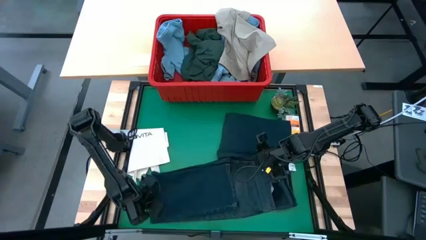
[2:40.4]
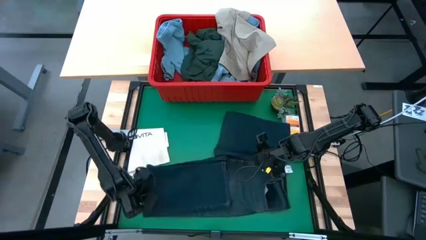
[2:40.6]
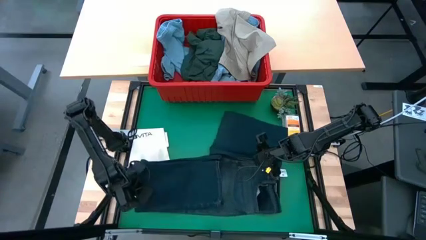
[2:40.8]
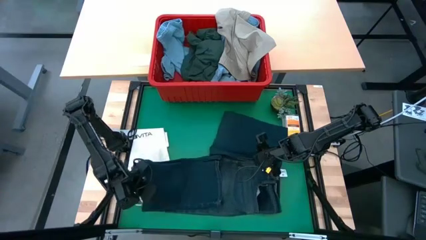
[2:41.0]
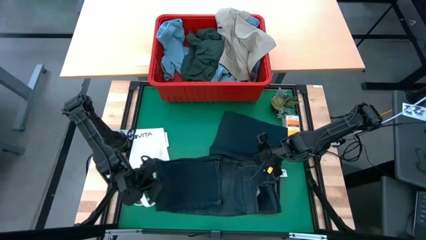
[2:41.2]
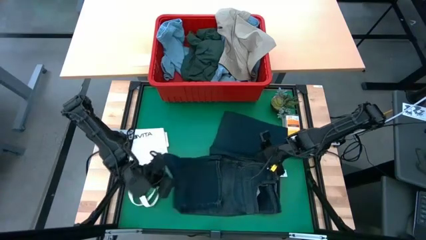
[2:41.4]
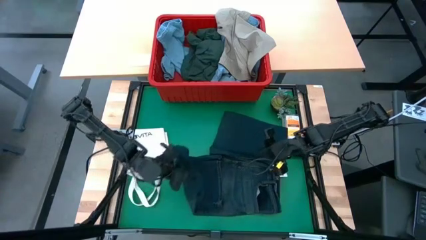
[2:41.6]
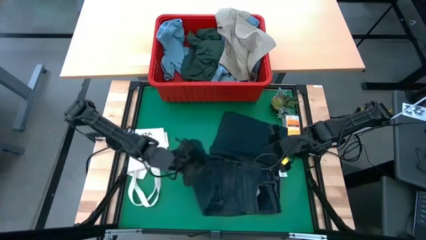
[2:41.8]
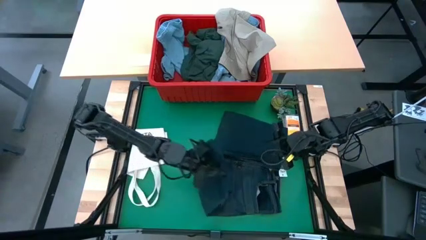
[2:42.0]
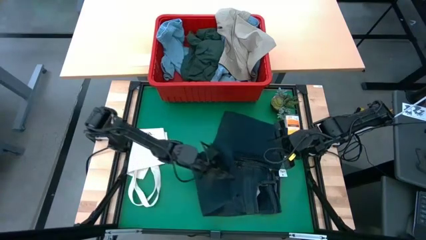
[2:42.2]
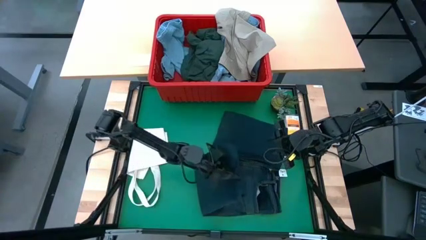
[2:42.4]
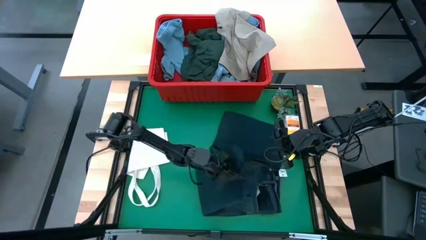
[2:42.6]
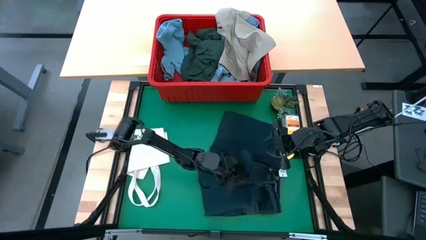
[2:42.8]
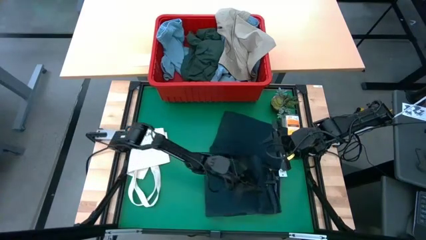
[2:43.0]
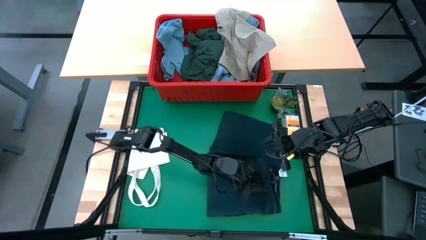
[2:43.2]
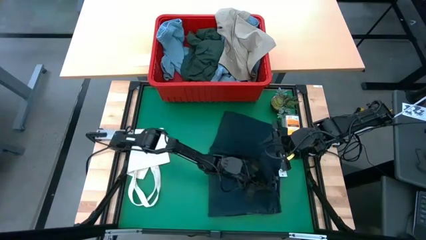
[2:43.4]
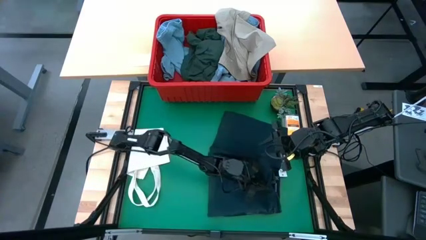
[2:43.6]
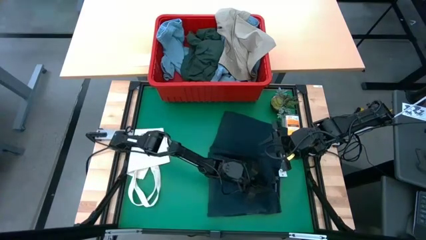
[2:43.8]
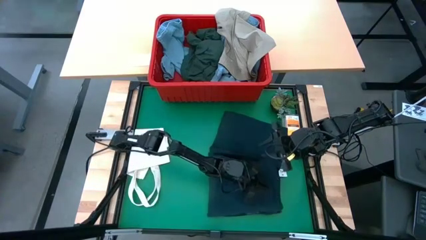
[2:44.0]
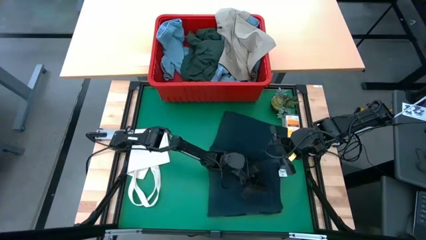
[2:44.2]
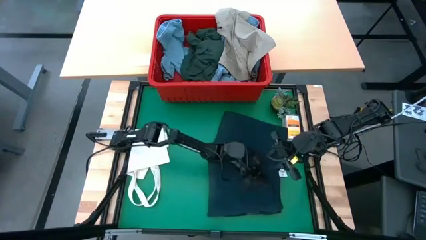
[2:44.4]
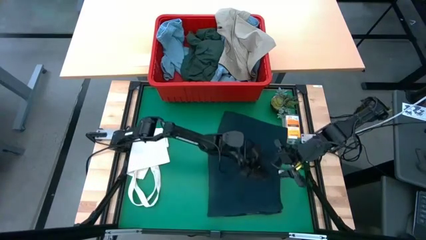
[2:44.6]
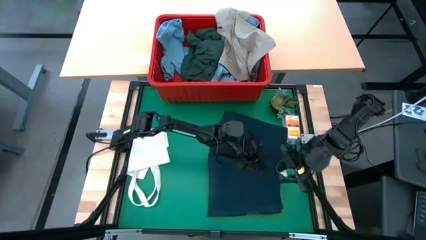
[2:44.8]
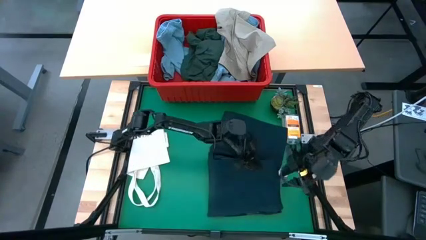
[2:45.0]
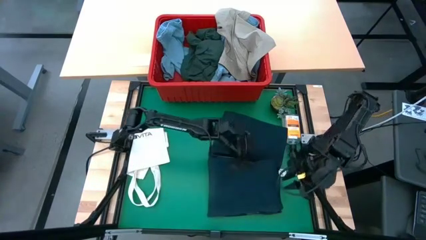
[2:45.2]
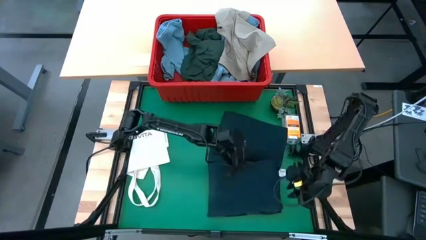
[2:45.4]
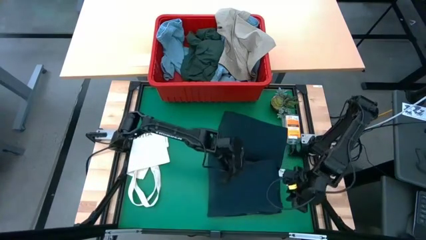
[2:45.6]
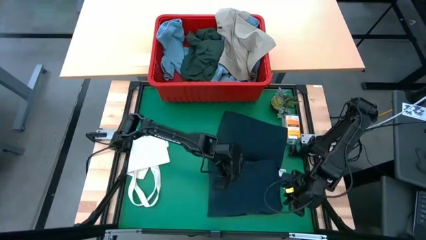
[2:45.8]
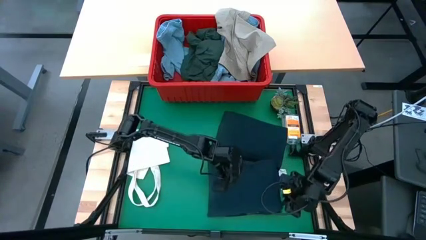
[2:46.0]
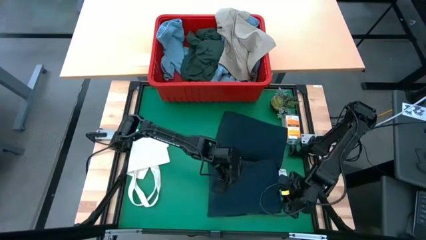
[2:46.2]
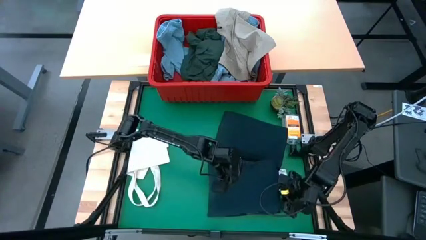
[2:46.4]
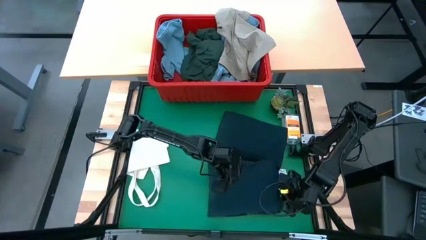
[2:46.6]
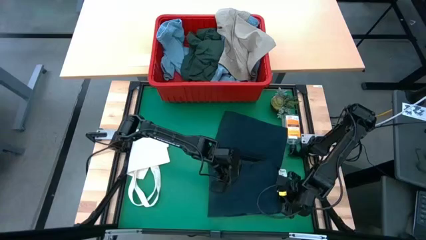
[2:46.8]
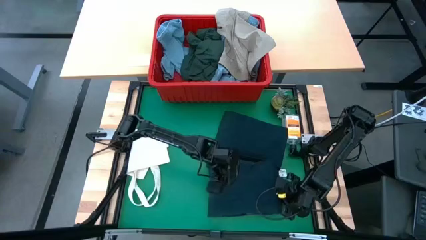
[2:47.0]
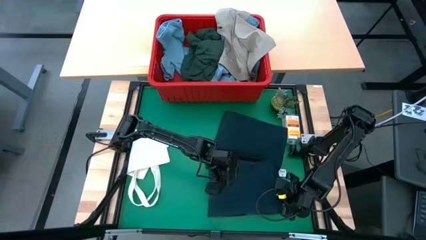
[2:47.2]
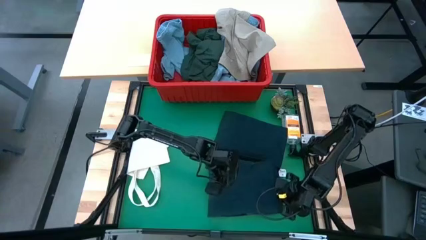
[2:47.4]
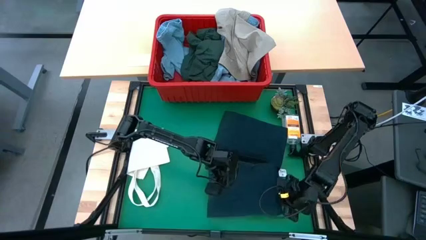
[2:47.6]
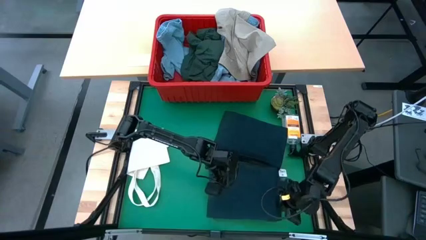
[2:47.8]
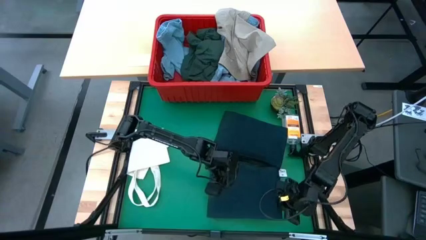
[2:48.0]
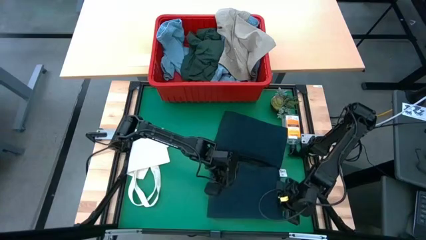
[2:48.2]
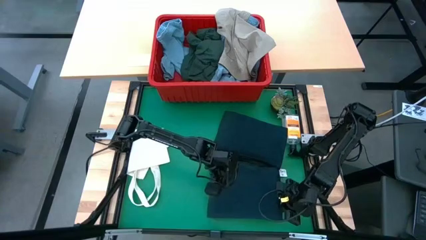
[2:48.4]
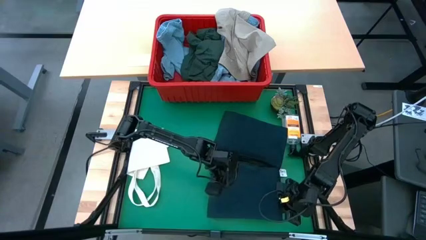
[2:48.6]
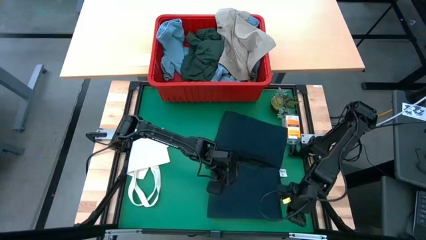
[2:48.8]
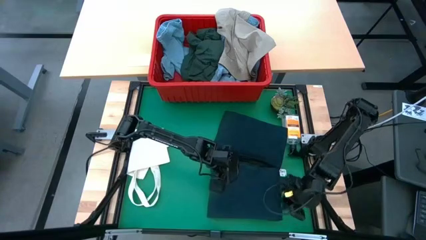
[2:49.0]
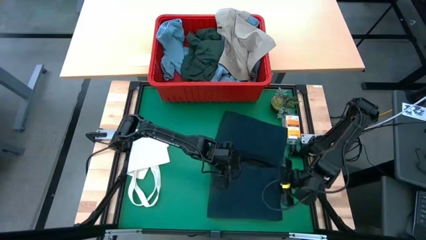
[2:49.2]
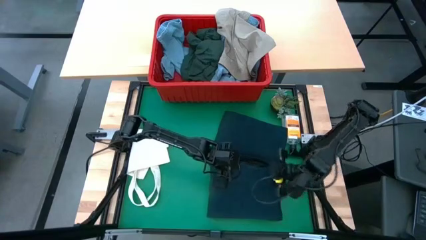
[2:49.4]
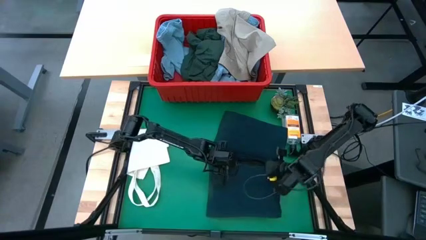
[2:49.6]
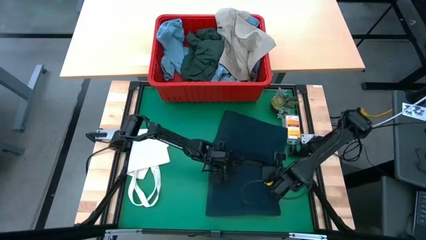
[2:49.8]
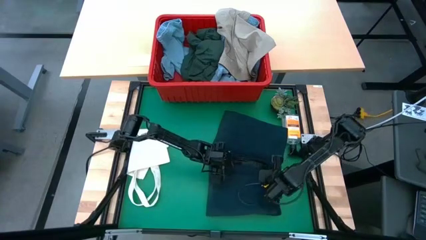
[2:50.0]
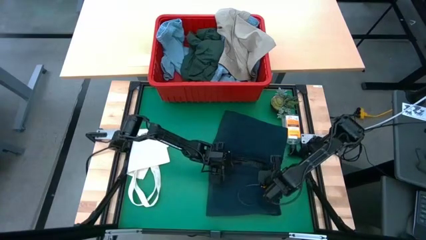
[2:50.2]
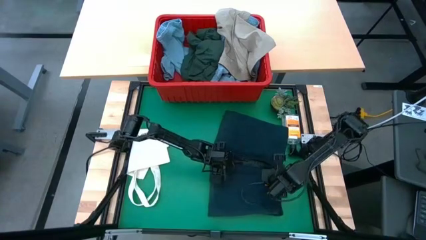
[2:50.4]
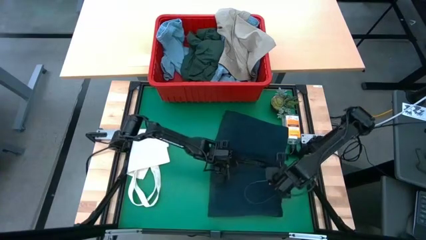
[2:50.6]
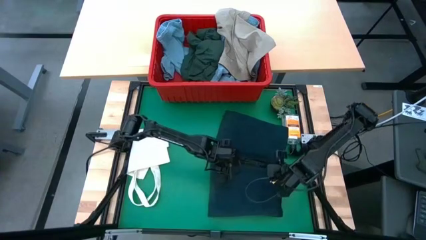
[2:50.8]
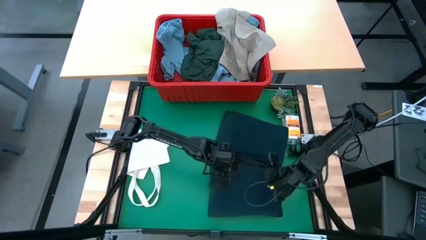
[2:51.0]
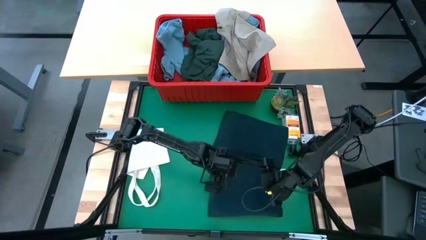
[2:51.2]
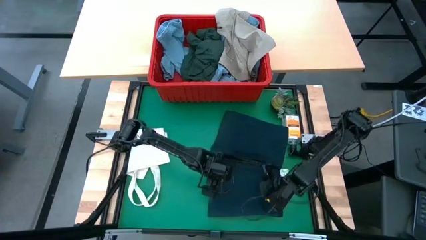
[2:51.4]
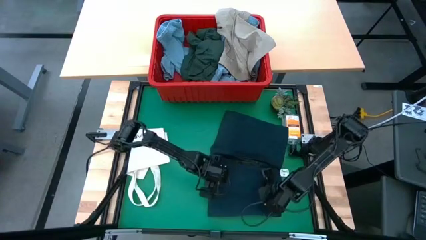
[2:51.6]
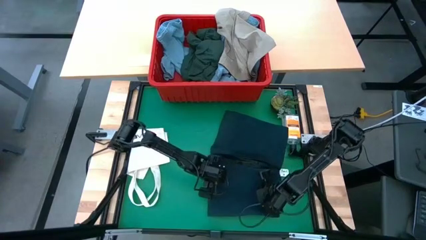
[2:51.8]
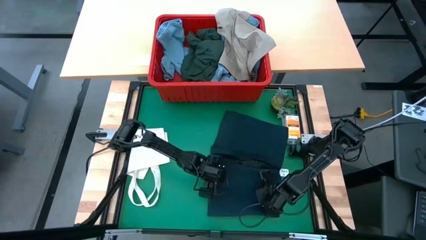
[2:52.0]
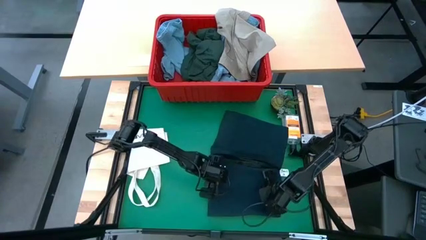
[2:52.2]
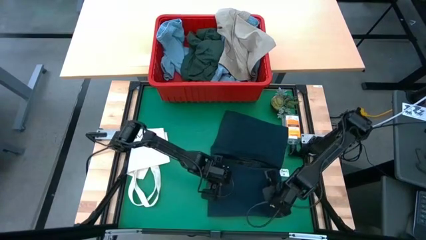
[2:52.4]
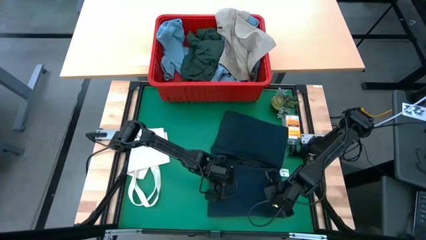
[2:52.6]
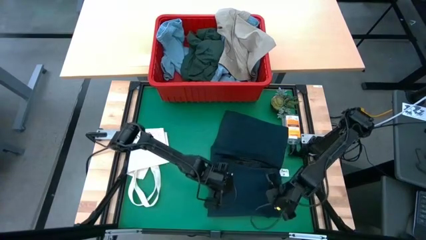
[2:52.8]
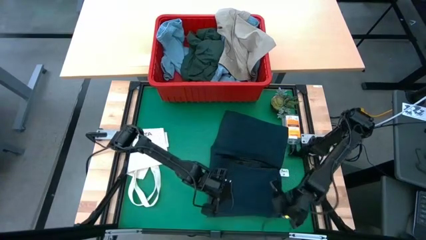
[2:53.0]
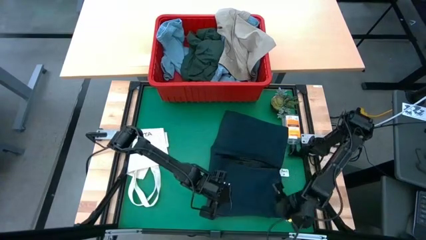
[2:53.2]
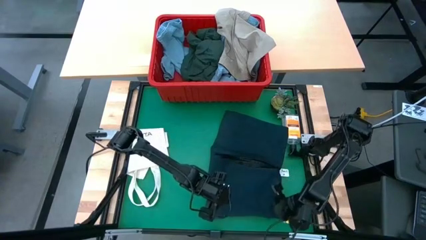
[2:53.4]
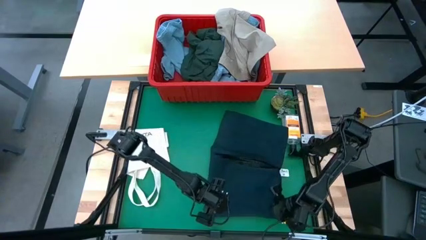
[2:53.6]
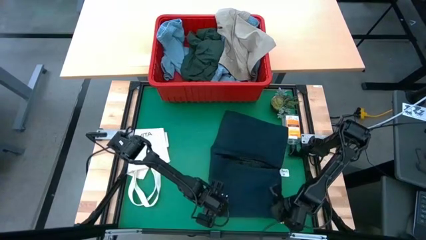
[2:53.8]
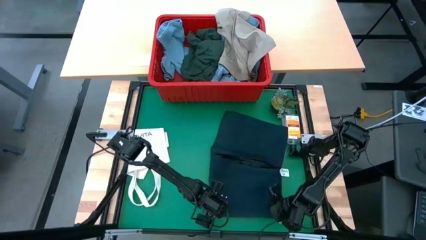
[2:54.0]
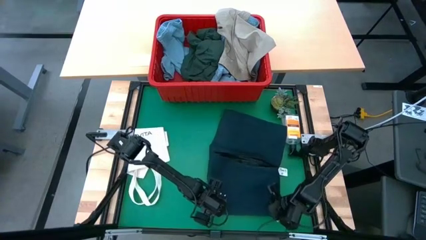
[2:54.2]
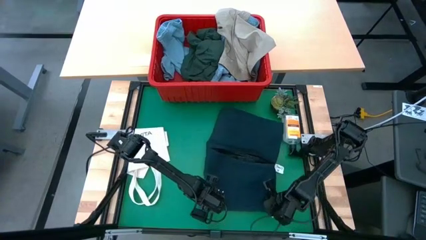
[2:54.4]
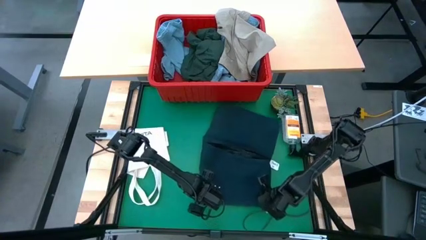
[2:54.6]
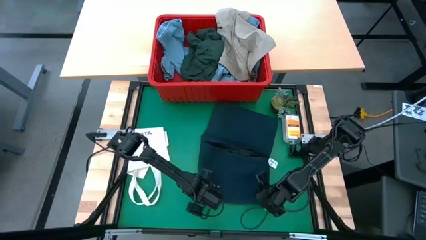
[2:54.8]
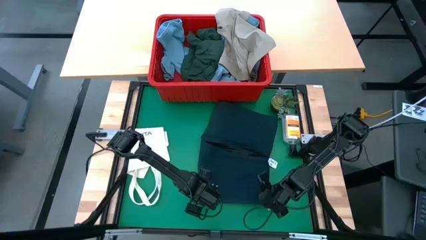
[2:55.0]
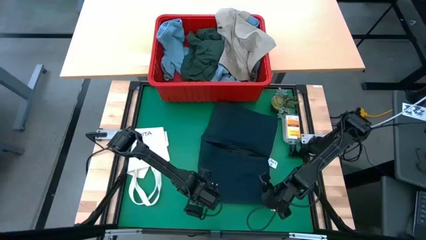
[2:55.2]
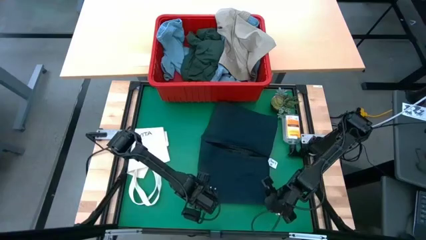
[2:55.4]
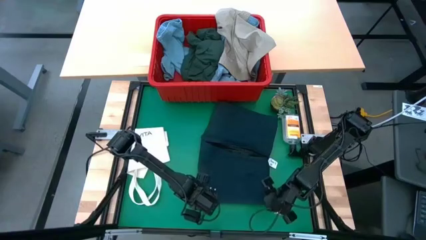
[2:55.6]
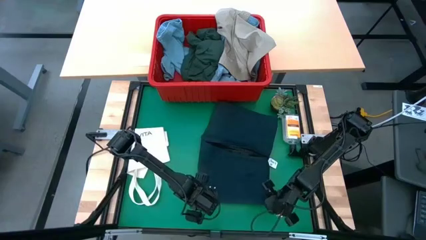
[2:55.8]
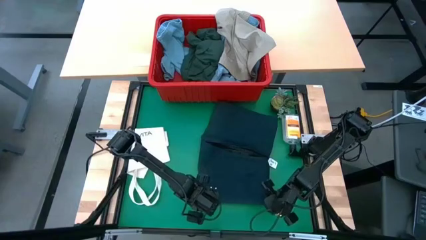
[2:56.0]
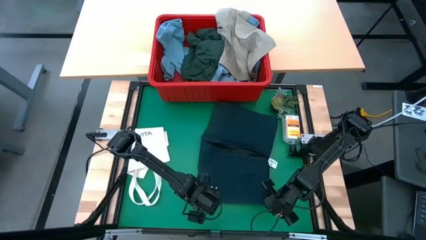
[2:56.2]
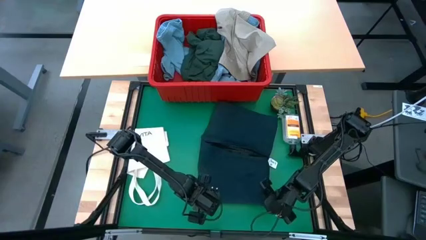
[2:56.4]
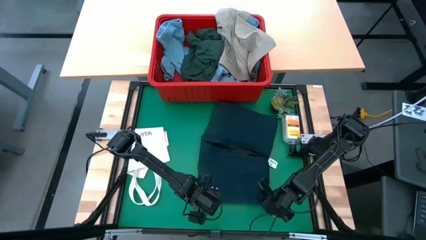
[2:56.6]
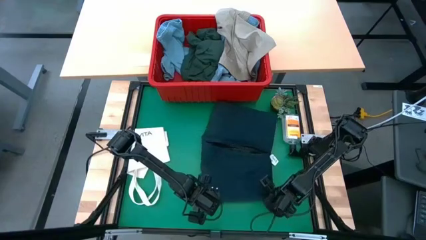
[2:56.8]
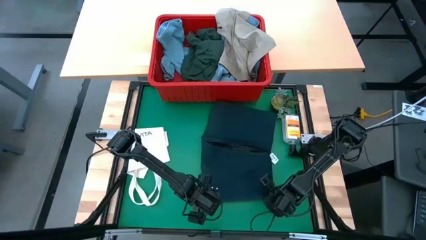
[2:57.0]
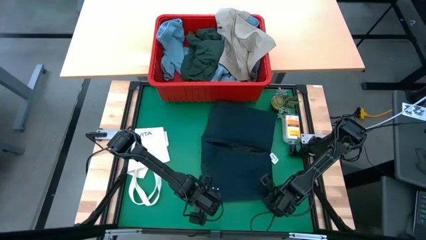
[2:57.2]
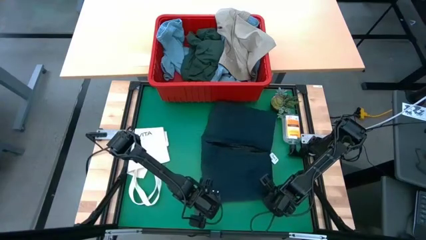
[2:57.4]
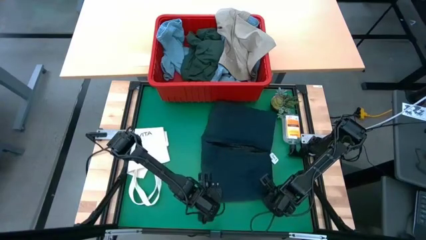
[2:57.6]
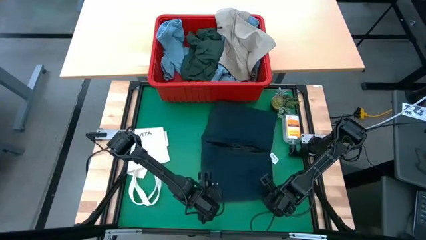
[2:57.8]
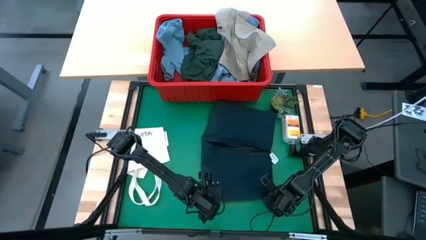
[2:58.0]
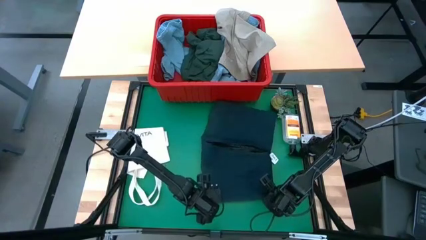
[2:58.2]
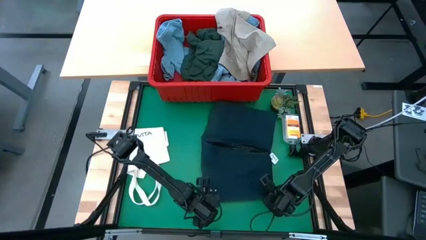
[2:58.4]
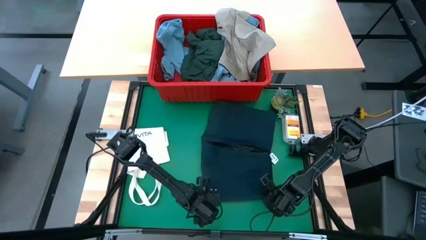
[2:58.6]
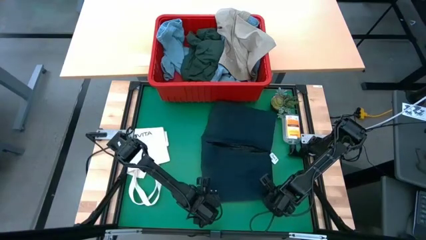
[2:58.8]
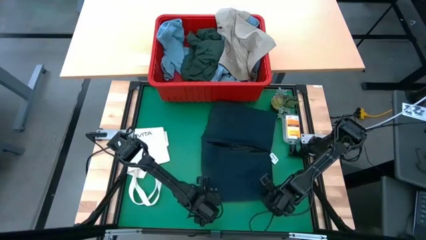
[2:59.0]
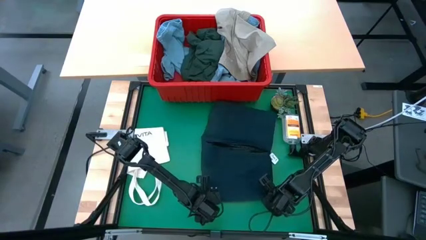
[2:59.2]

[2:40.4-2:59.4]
Task: Fold laundry
Fold the dark blue pants
